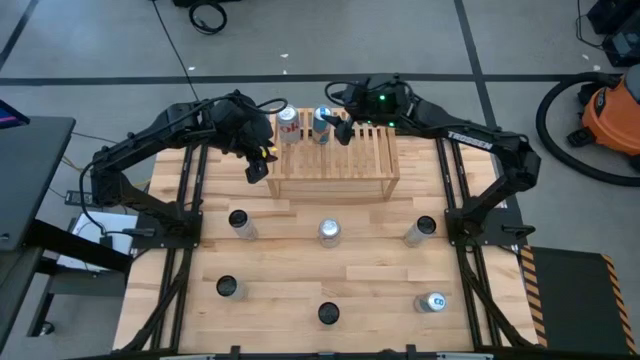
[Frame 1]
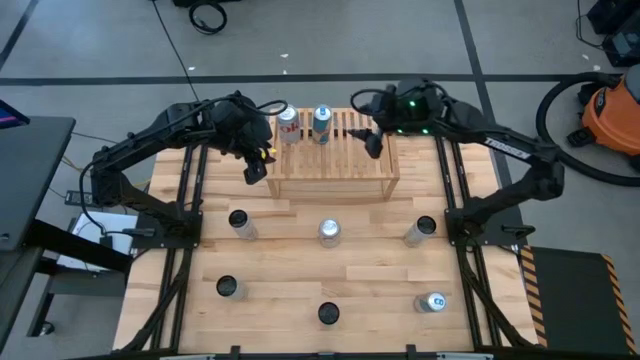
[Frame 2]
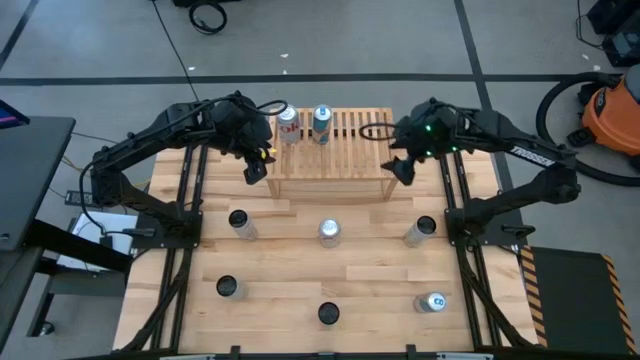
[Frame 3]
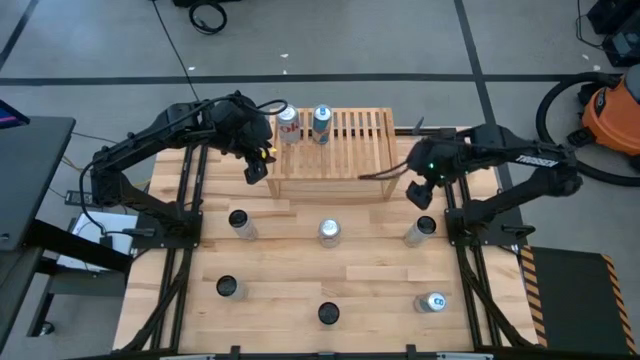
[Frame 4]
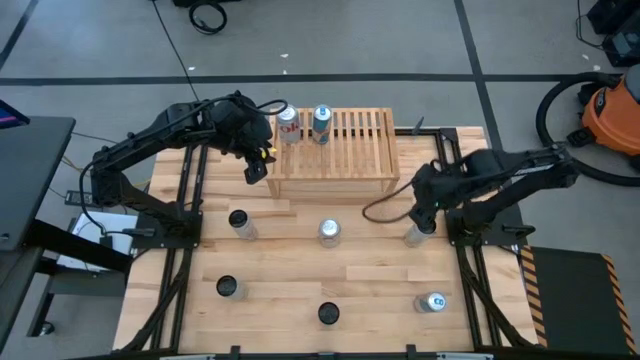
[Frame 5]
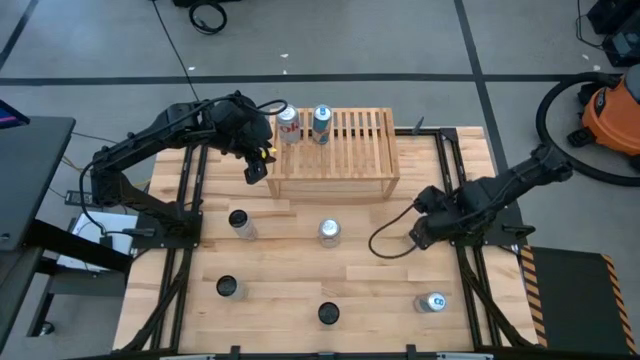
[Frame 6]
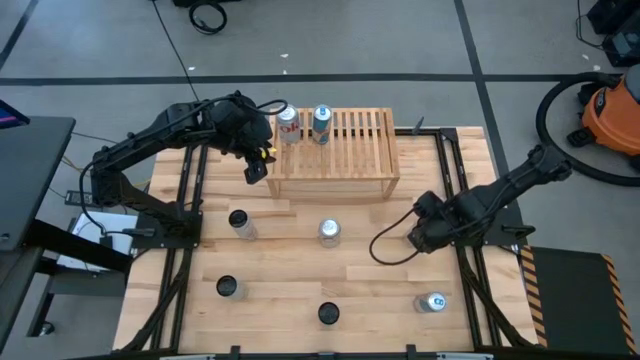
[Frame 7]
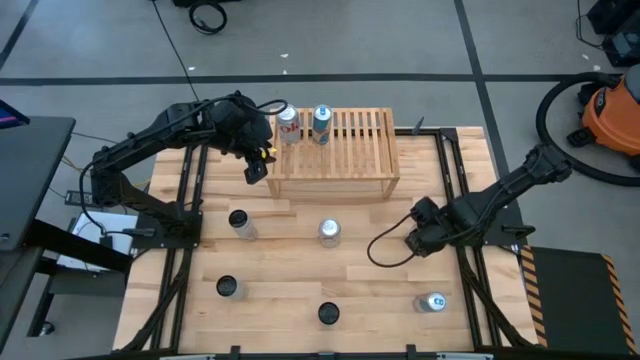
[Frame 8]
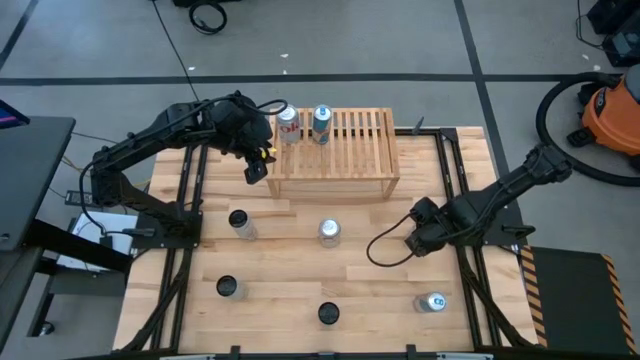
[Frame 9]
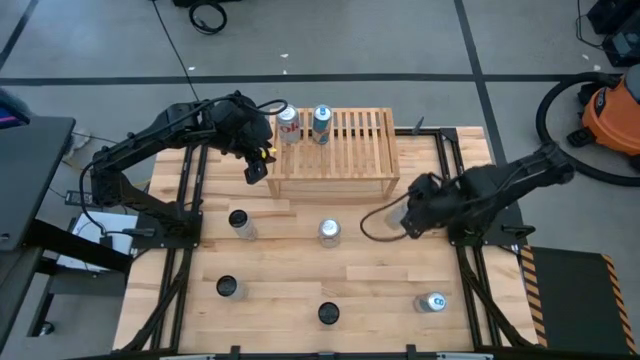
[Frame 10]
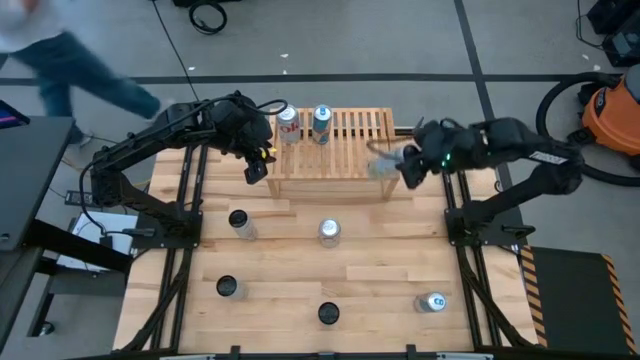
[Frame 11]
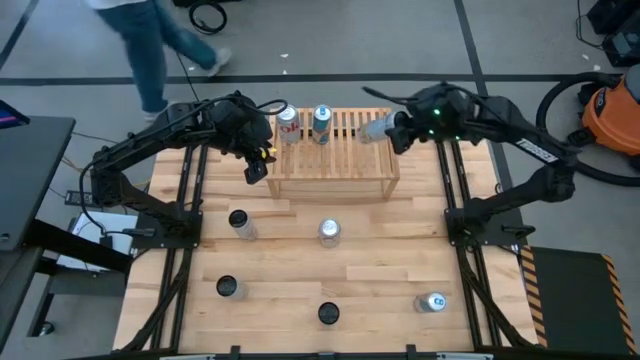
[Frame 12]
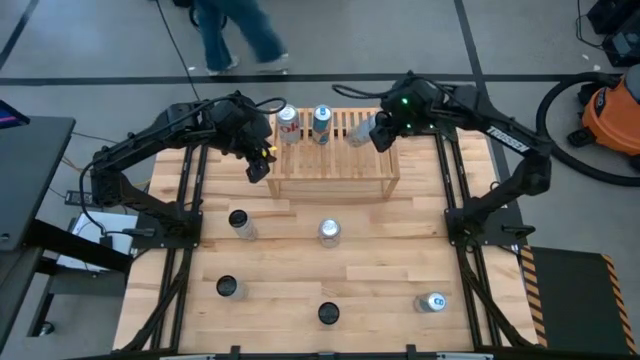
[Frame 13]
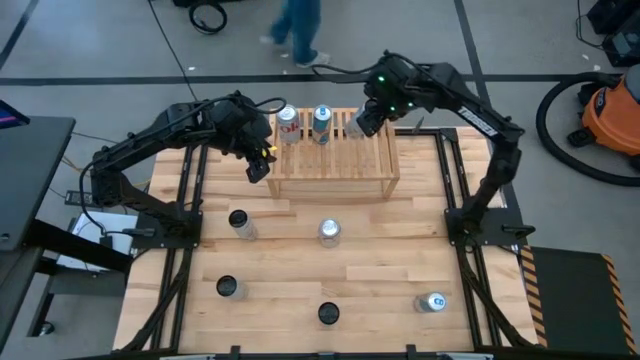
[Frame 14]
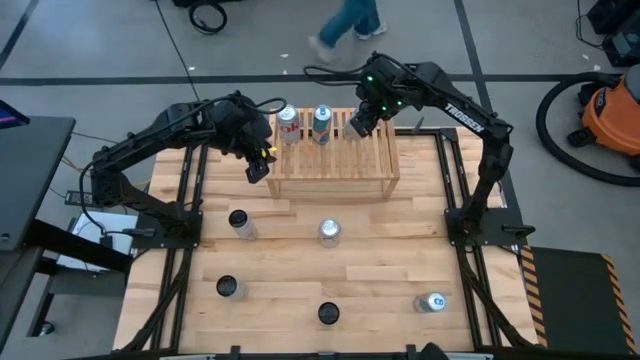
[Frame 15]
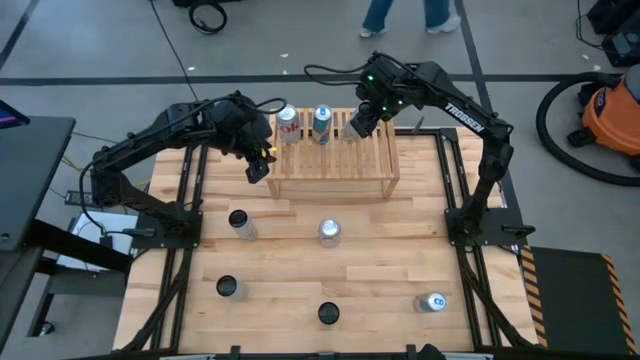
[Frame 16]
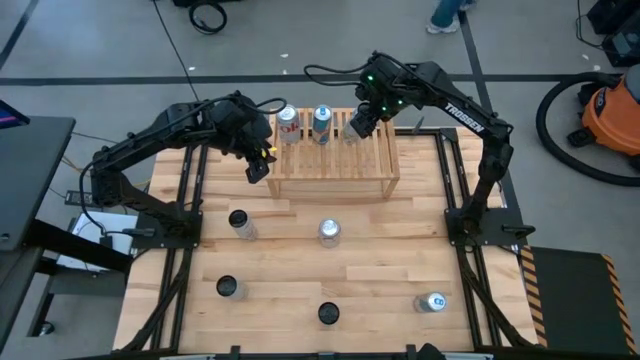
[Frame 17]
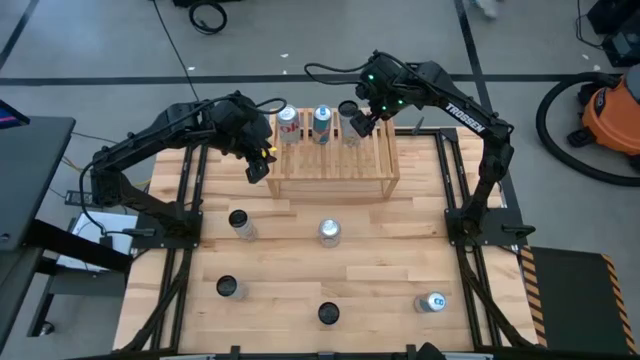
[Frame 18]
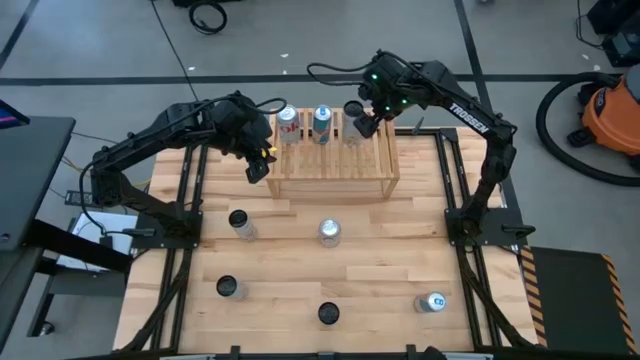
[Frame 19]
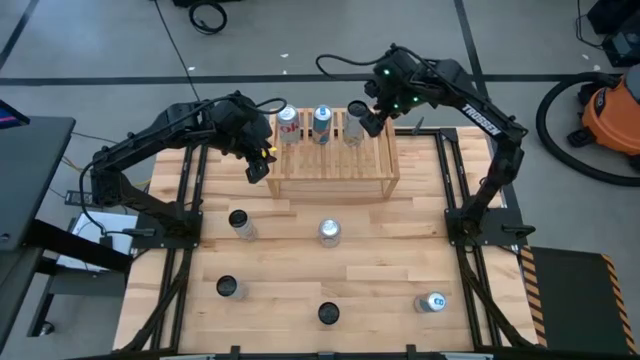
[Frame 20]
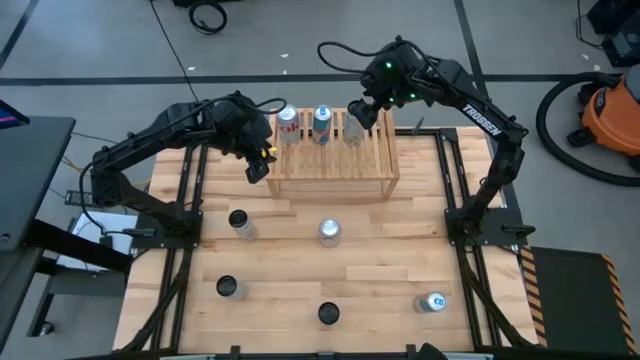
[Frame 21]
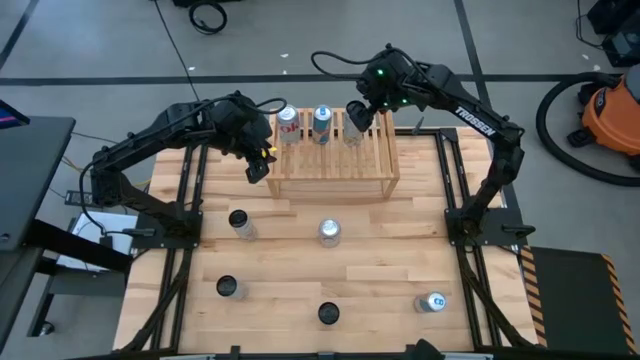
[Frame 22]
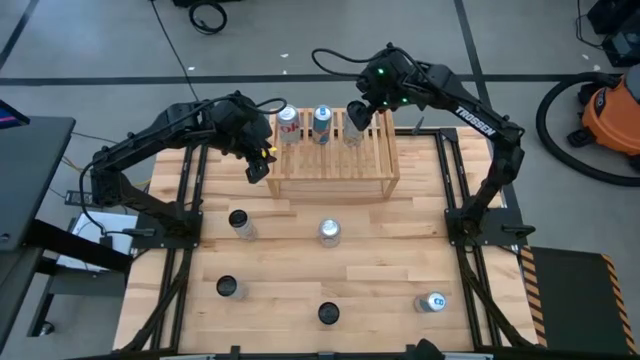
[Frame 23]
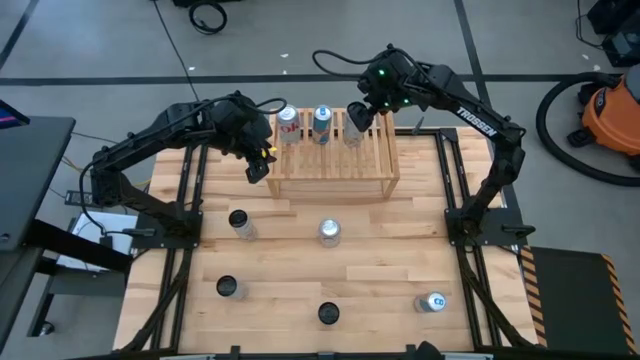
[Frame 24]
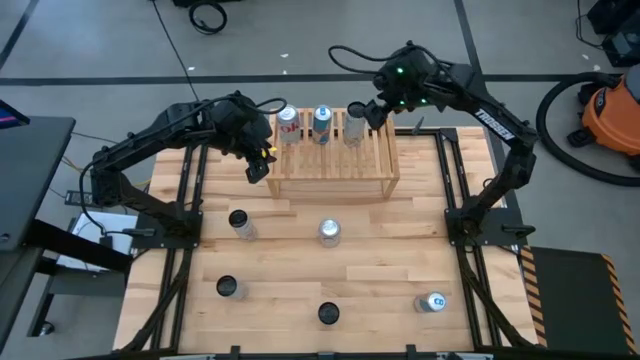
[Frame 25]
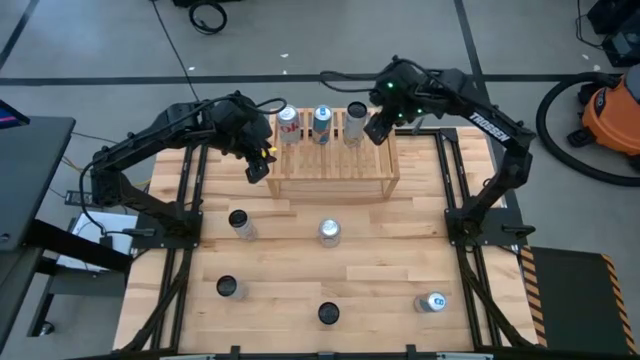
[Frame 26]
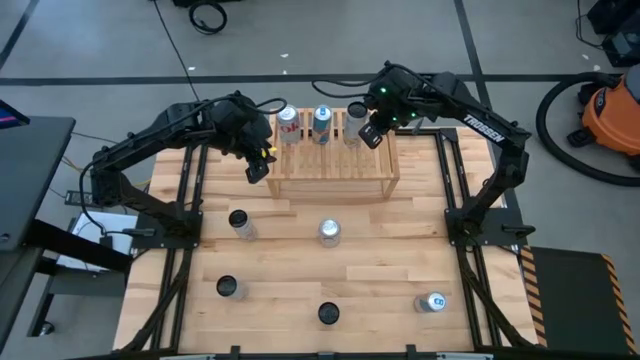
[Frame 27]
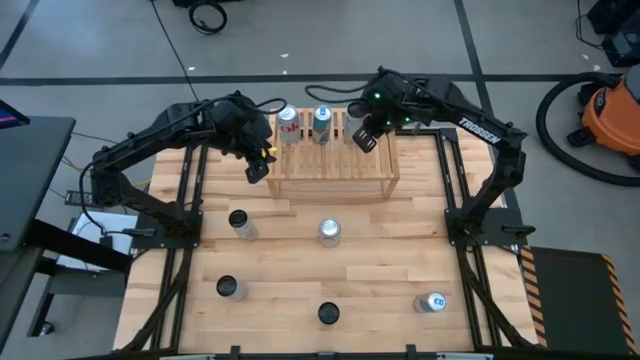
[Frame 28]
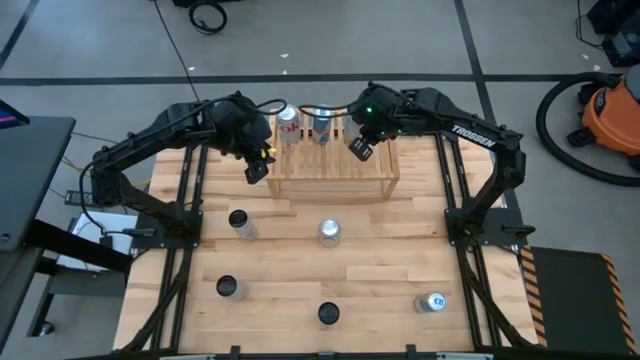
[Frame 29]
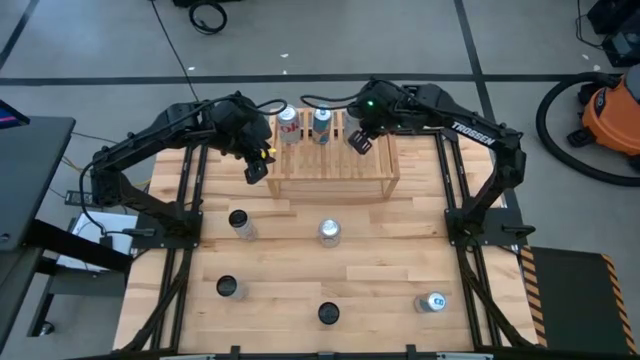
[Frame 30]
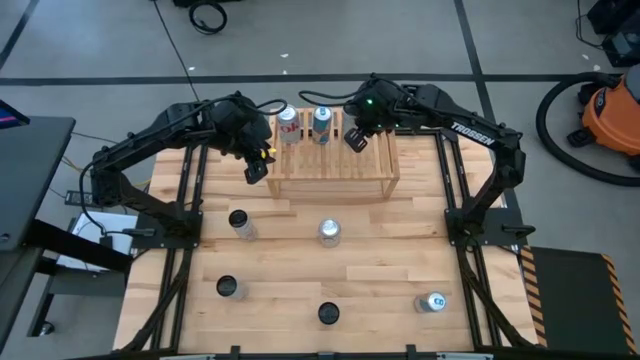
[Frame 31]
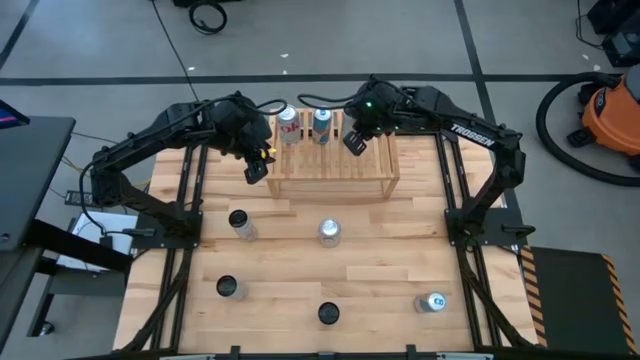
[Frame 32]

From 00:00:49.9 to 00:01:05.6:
Task: Place canned beverage on shelf
Put the top white-yellow soda can on the shelf
